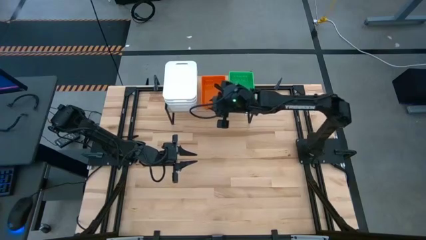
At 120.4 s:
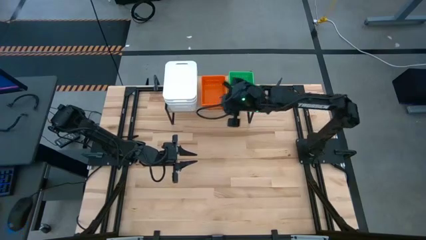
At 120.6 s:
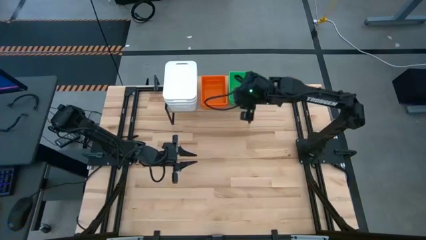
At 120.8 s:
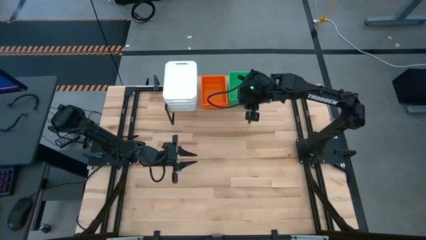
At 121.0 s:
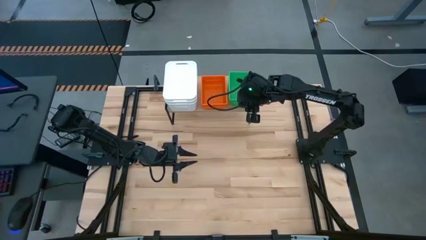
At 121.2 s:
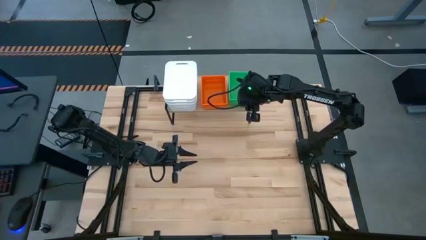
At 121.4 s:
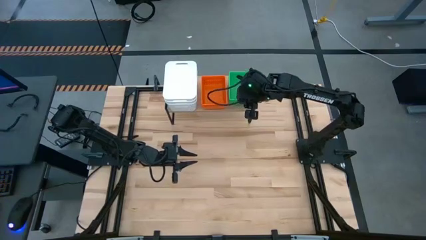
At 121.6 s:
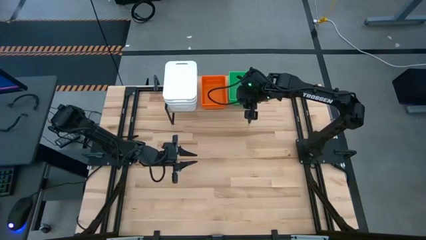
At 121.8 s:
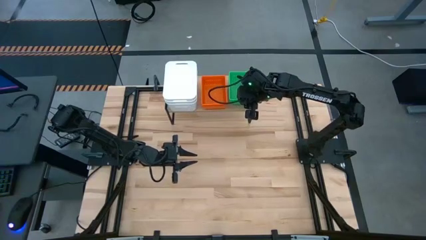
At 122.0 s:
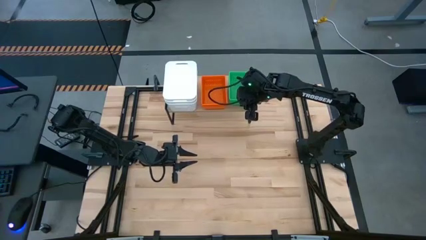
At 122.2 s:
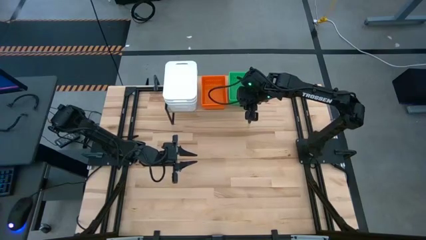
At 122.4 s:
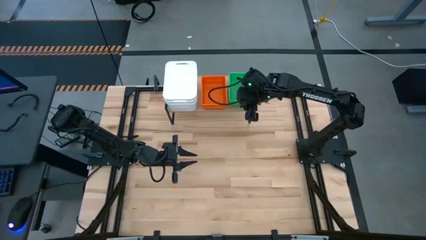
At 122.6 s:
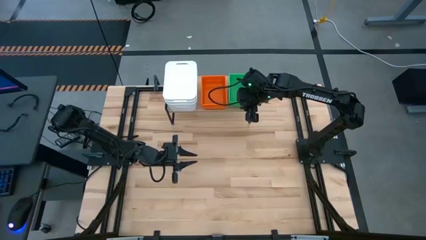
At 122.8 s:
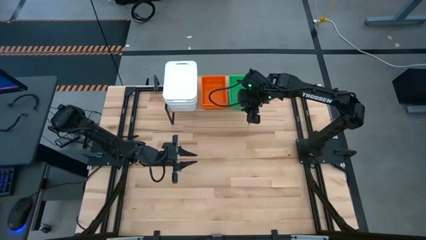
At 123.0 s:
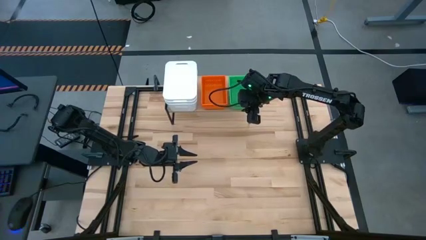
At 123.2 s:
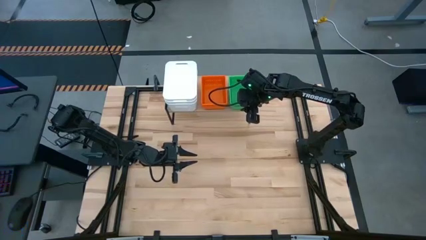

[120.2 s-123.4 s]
Task: Stack baskets on shelf by color
Adjust the stacked green bins

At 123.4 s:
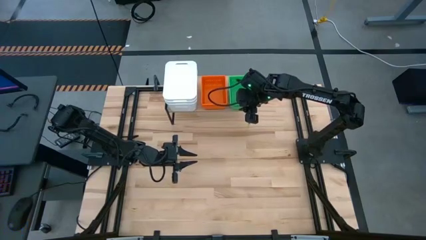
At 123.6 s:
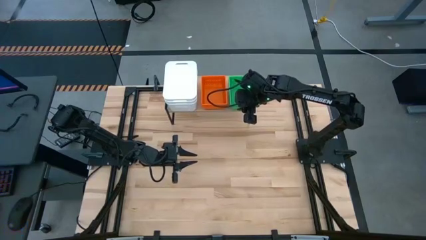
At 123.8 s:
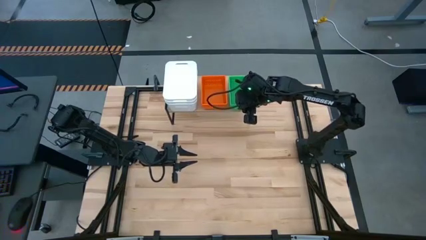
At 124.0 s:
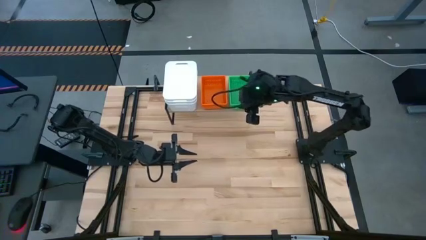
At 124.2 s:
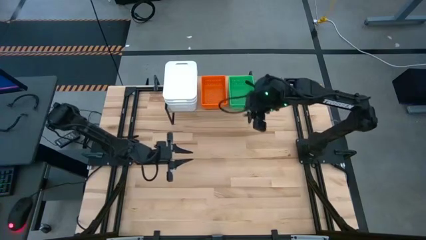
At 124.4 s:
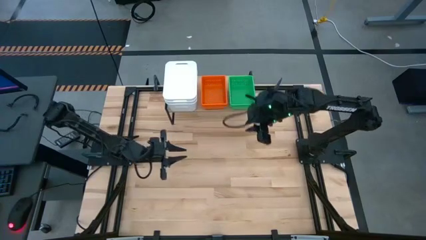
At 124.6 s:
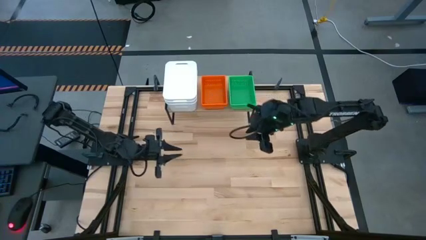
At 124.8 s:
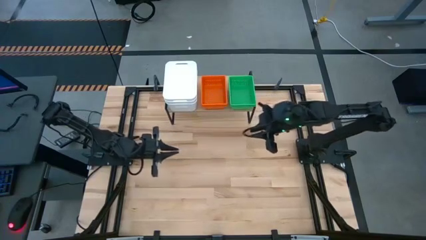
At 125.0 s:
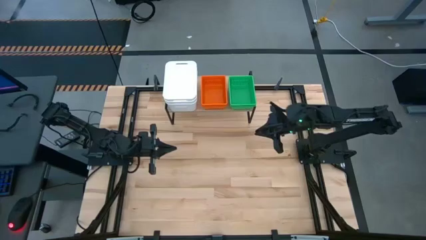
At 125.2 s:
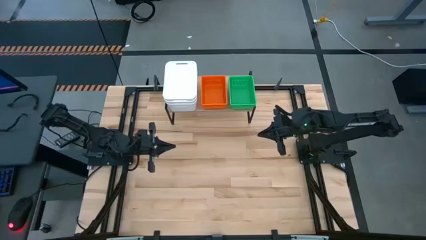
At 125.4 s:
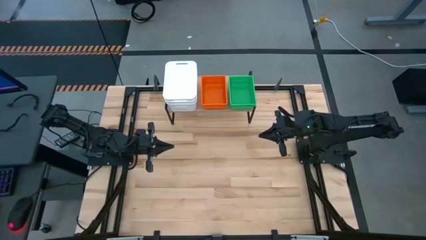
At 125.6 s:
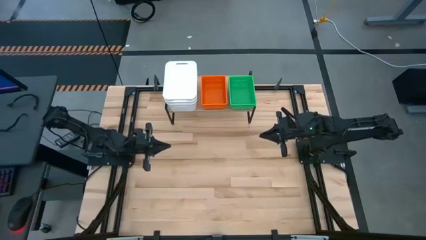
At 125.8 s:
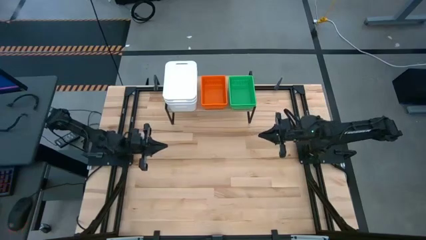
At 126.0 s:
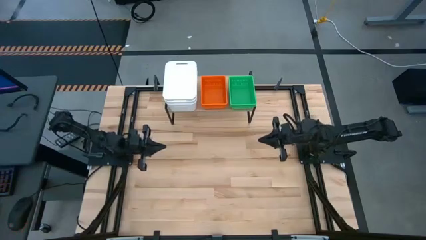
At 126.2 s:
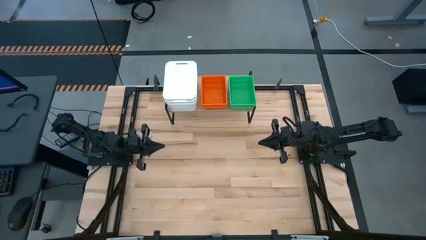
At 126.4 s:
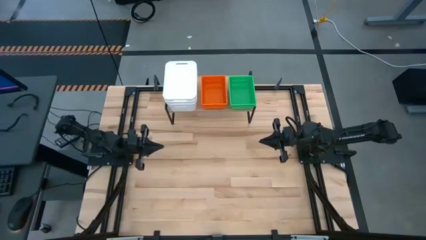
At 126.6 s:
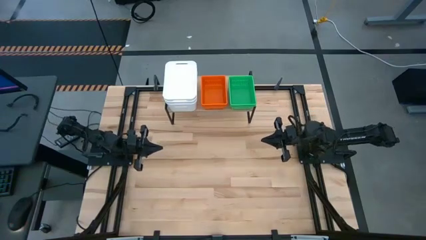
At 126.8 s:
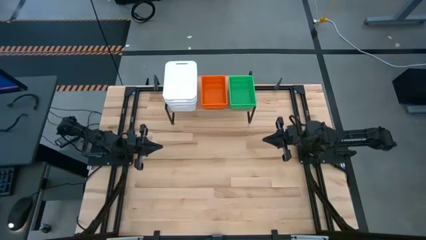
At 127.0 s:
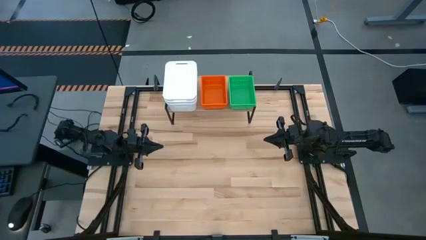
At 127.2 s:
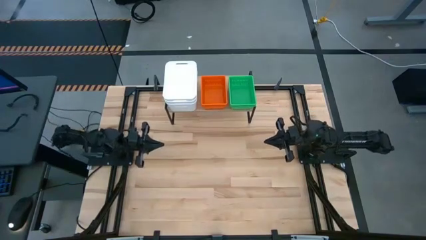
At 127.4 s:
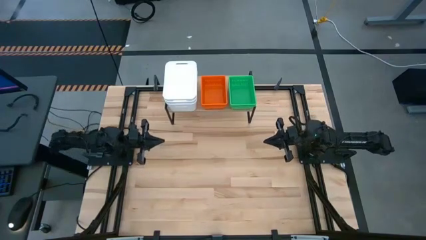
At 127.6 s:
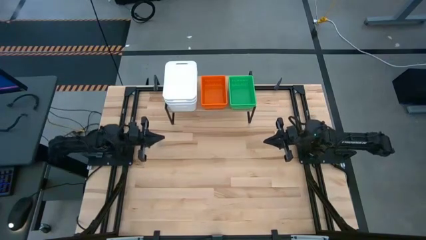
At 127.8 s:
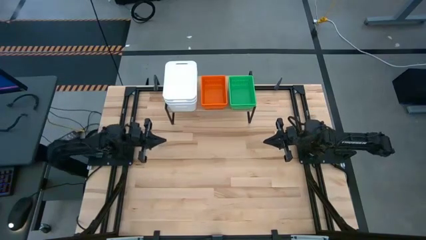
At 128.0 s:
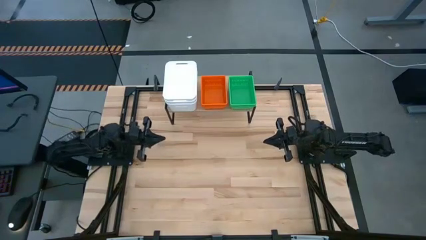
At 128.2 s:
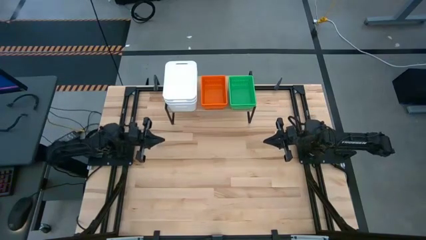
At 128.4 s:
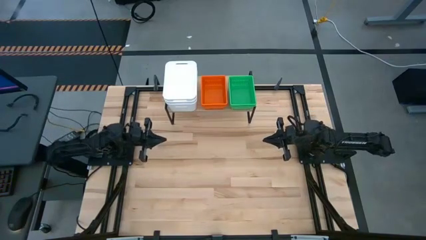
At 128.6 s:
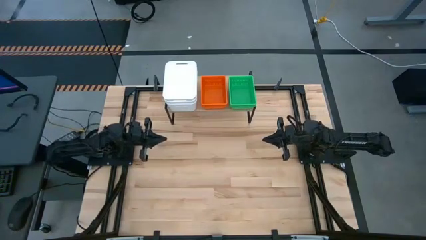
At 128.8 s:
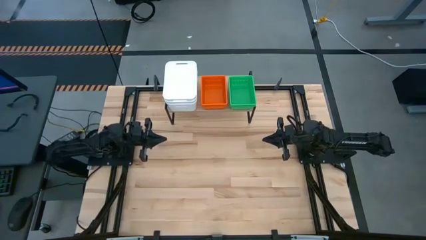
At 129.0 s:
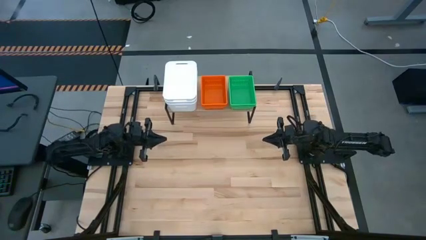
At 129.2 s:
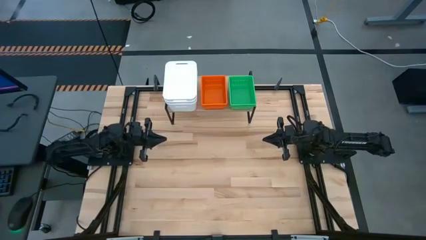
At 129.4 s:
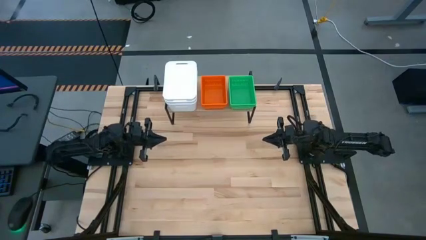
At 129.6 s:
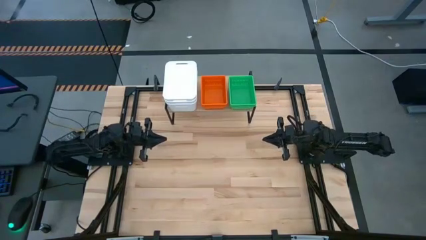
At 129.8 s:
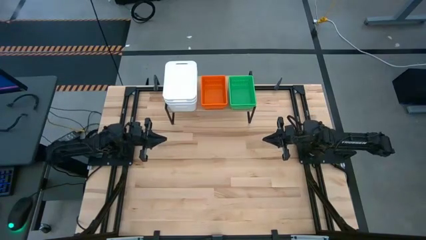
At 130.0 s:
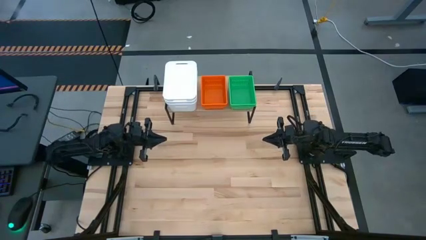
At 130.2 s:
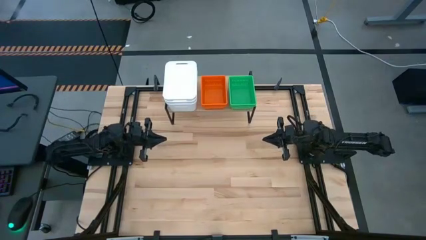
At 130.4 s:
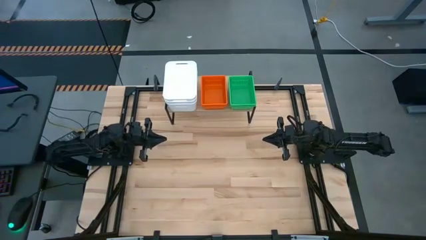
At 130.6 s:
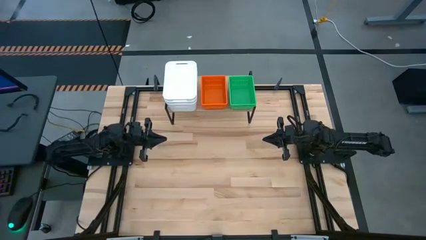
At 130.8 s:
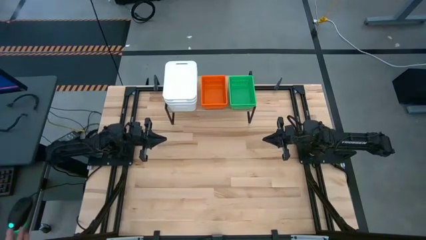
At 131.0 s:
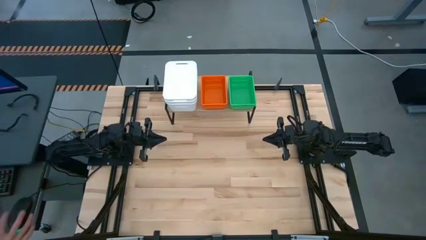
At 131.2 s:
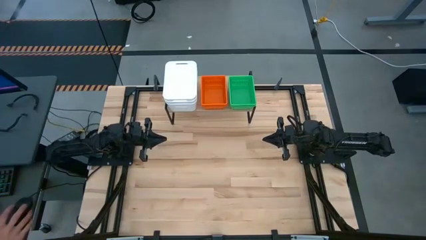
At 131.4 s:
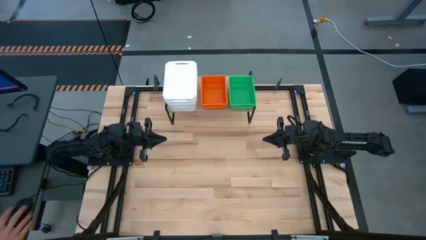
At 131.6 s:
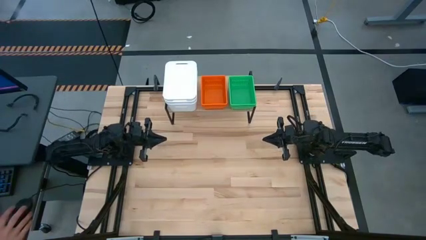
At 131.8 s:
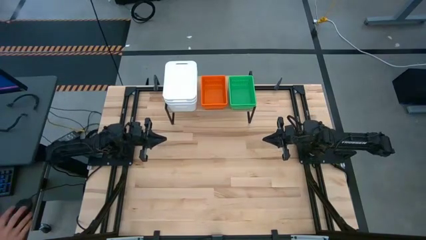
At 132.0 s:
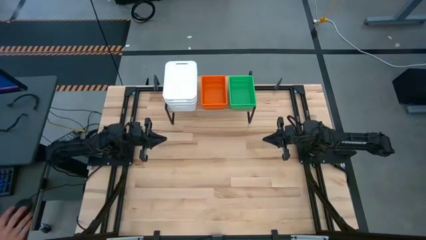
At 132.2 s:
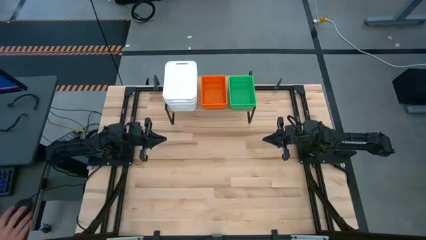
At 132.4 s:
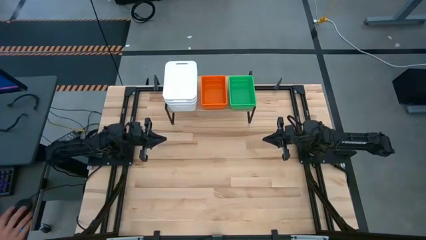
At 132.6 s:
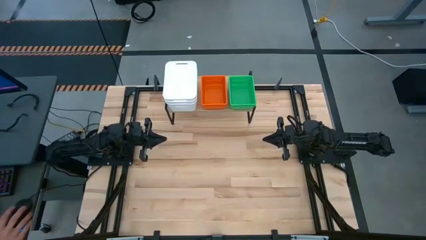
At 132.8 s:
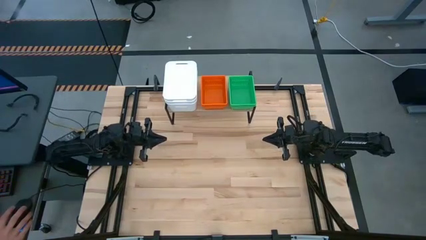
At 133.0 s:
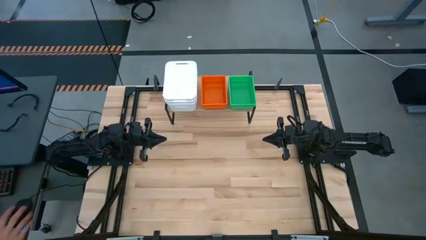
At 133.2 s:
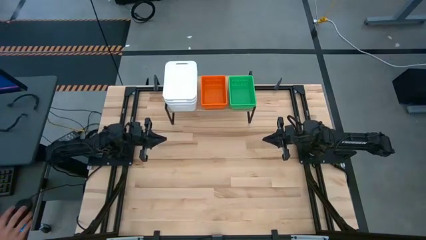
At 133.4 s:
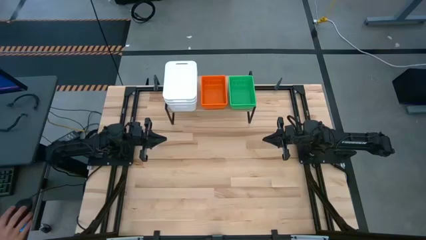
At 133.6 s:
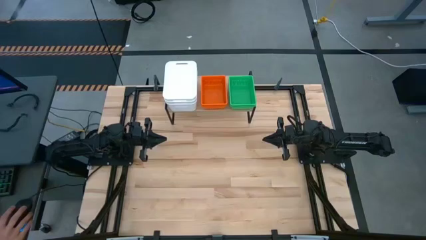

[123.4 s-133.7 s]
Return to Home Position

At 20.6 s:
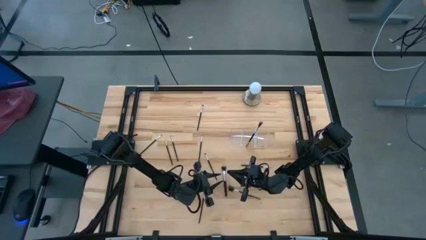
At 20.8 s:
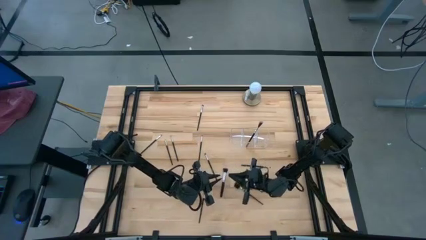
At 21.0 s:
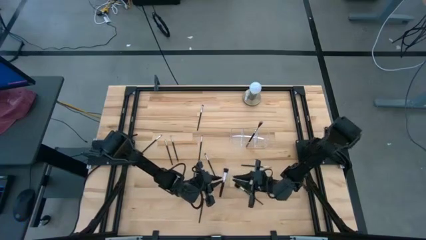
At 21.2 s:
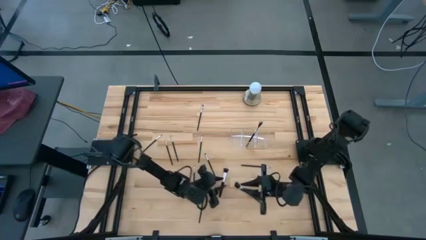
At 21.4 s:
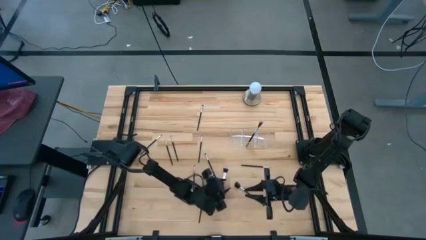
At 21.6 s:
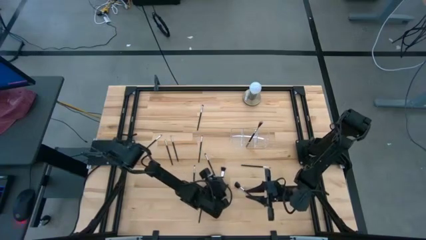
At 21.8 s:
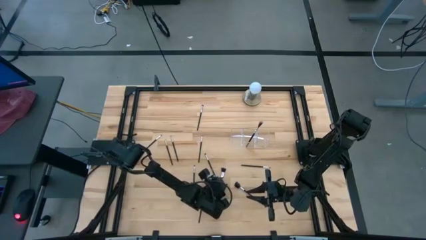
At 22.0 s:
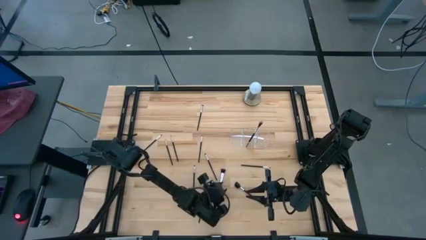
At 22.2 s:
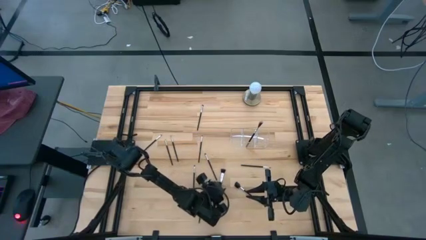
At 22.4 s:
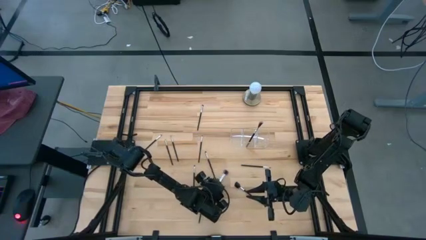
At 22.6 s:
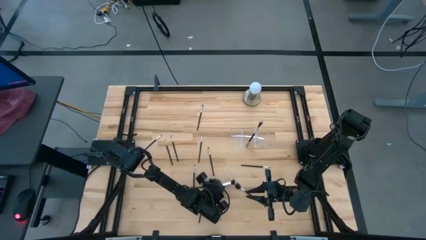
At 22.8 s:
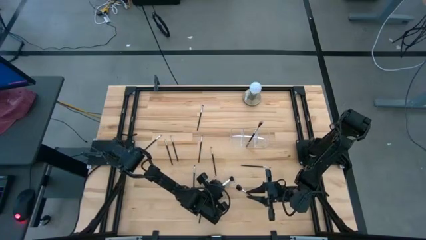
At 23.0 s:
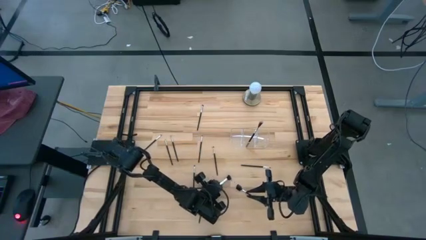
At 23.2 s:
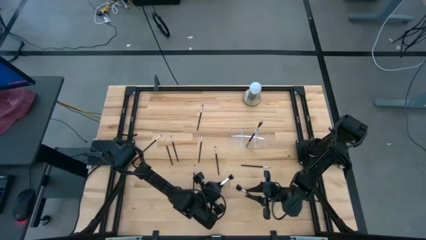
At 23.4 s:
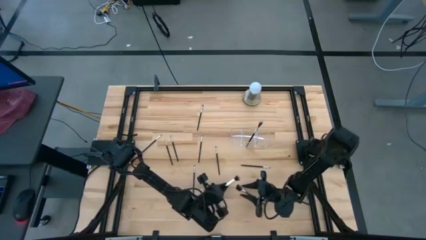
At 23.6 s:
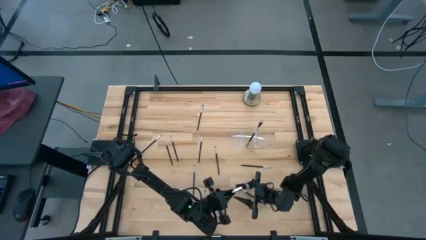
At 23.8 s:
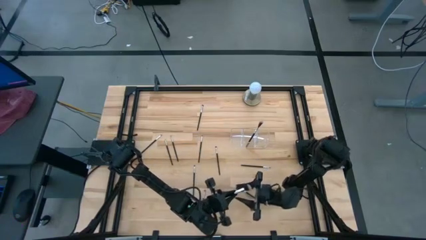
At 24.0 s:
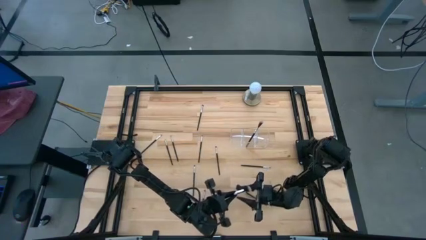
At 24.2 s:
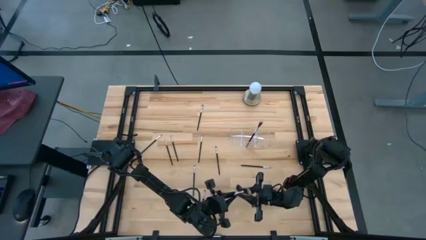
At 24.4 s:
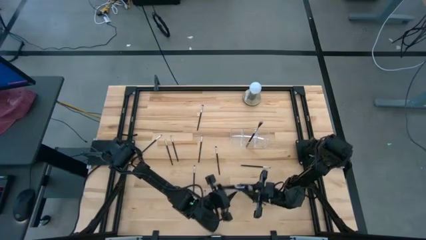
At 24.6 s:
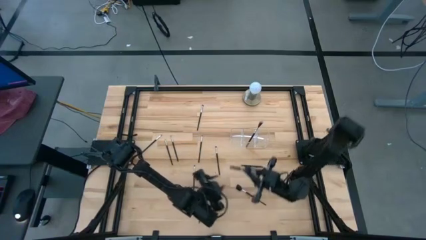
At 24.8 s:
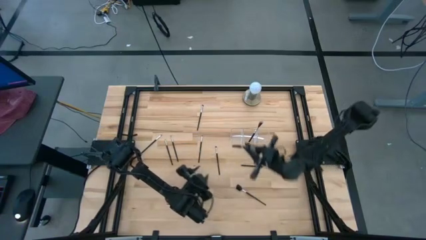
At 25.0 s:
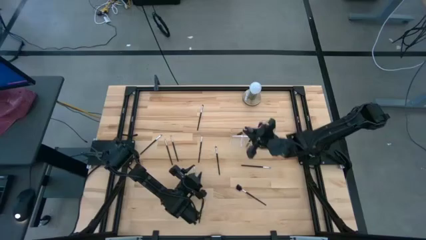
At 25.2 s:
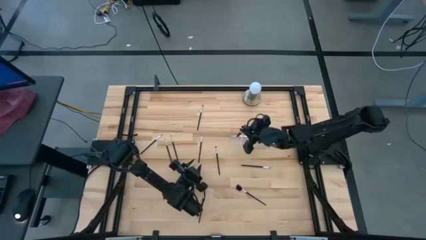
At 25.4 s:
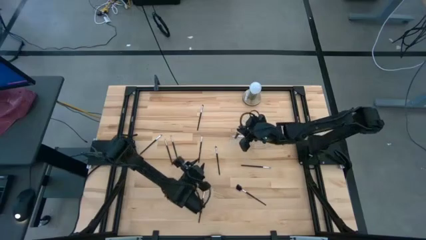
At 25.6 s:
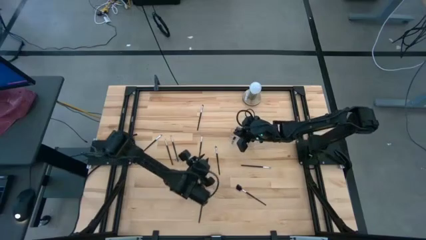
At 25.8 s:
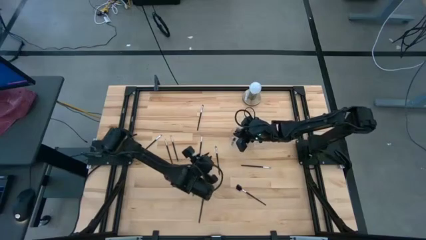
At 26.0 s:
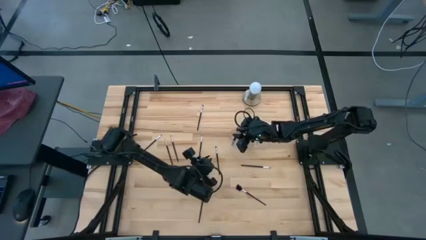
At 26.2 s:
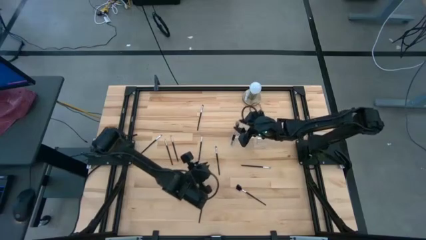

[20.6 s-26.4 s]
Task: Put items in baskets/containers
Put the black blush brush into the transparent organizer
